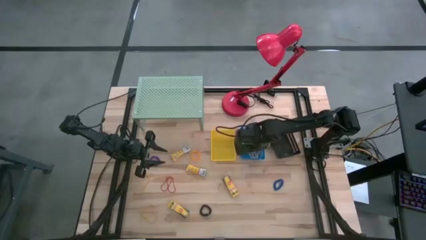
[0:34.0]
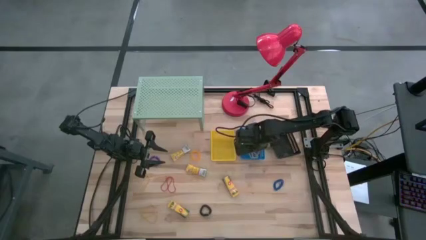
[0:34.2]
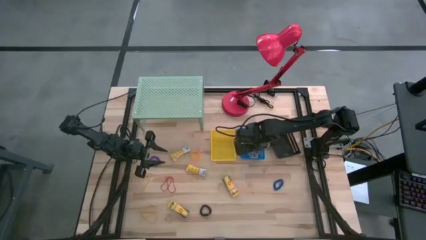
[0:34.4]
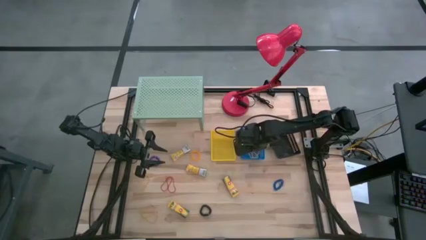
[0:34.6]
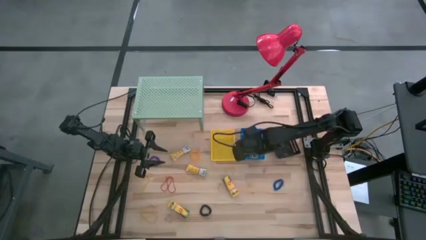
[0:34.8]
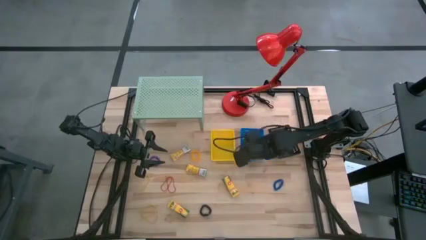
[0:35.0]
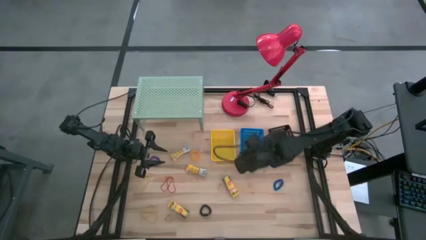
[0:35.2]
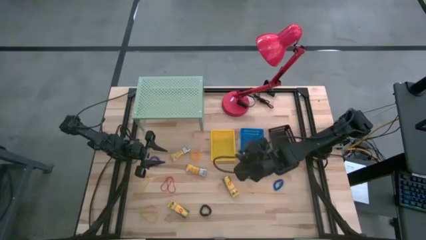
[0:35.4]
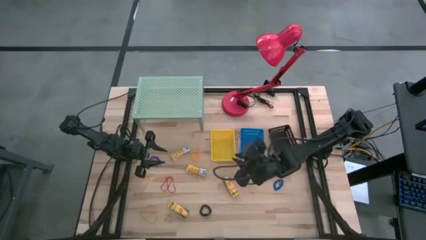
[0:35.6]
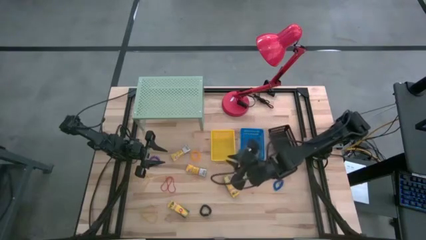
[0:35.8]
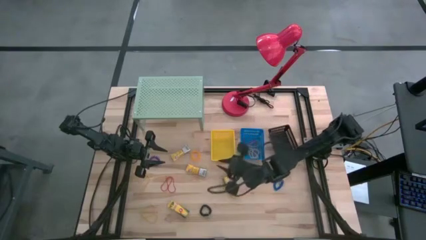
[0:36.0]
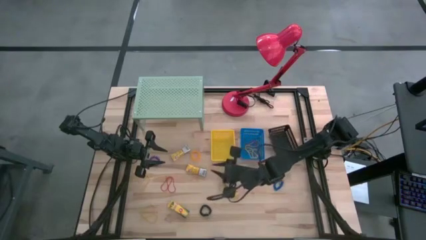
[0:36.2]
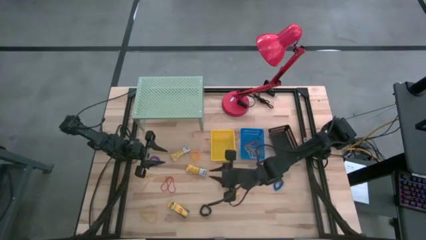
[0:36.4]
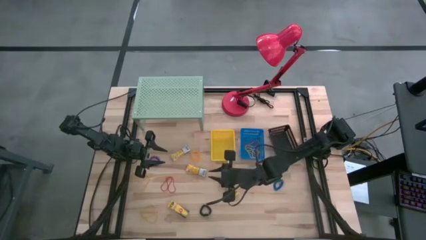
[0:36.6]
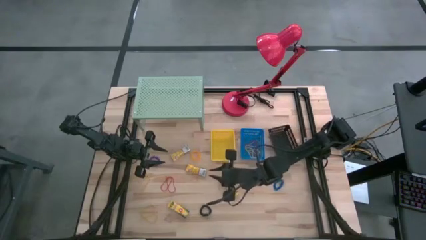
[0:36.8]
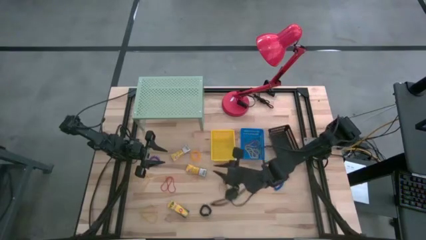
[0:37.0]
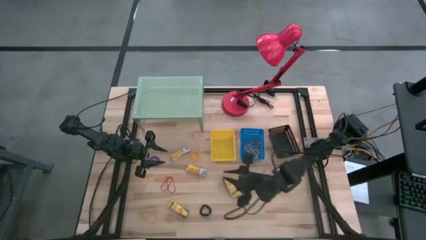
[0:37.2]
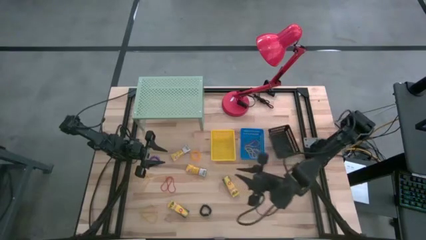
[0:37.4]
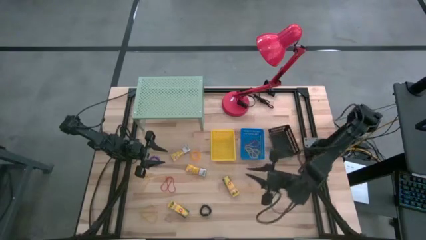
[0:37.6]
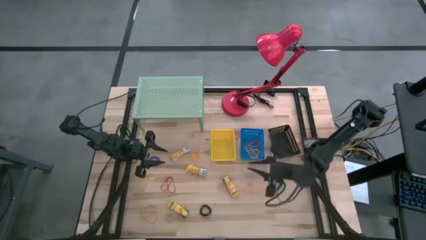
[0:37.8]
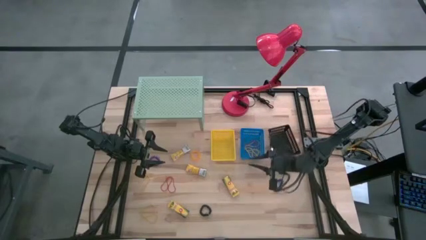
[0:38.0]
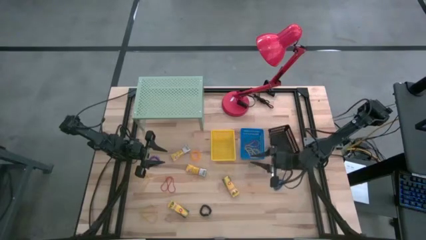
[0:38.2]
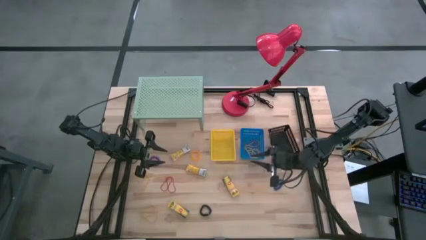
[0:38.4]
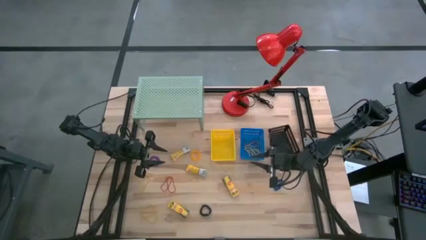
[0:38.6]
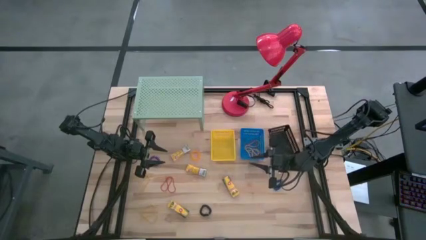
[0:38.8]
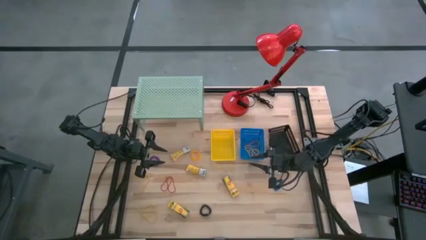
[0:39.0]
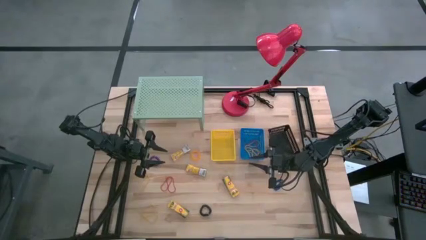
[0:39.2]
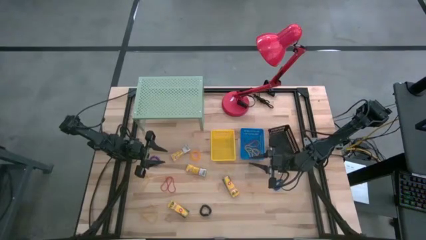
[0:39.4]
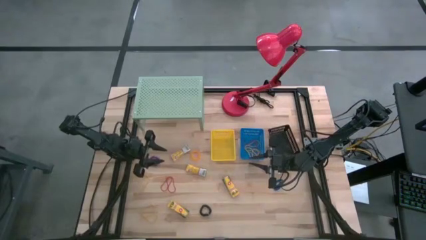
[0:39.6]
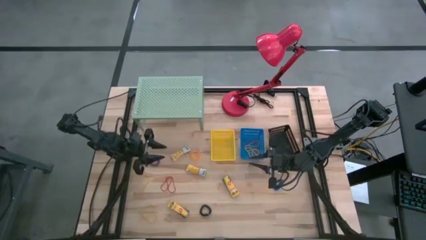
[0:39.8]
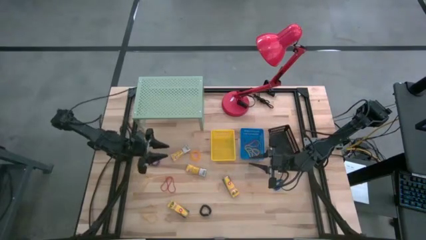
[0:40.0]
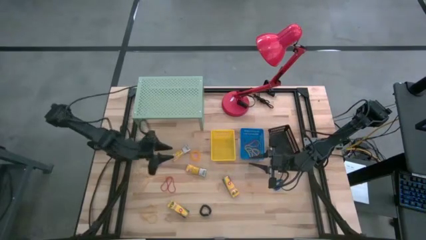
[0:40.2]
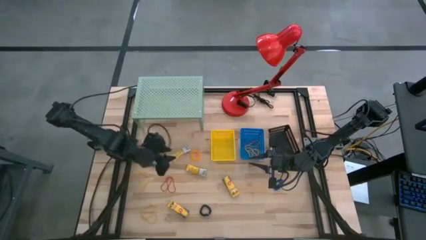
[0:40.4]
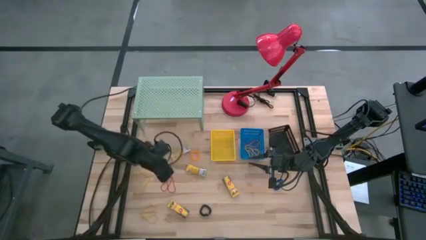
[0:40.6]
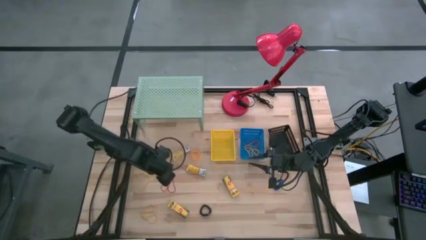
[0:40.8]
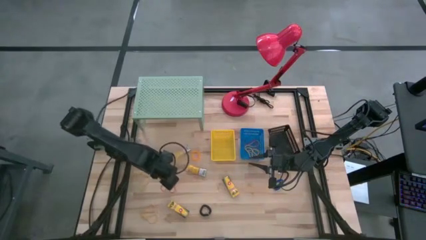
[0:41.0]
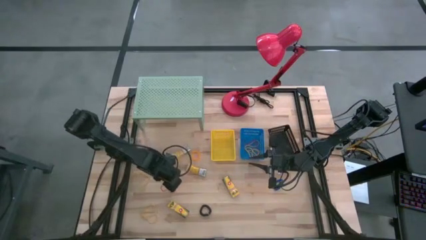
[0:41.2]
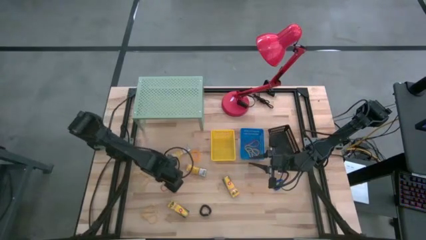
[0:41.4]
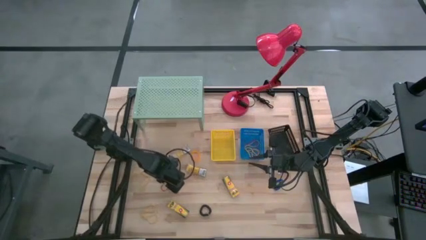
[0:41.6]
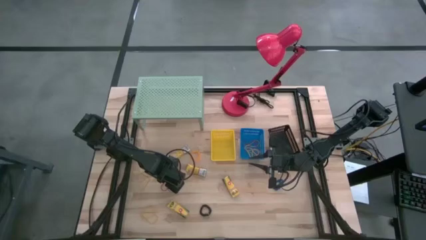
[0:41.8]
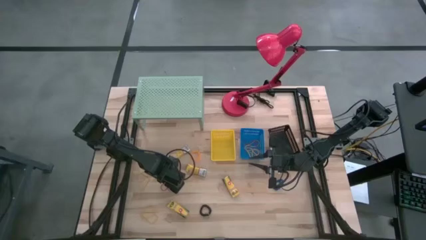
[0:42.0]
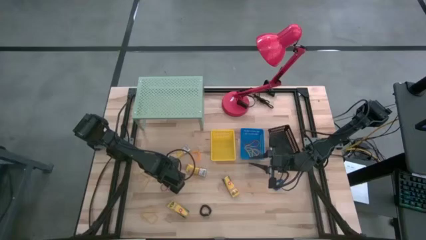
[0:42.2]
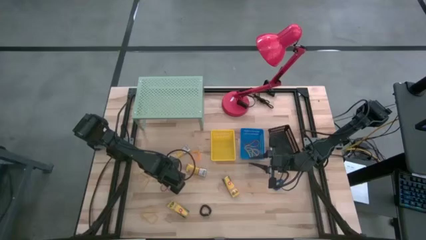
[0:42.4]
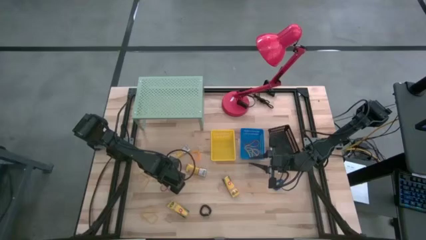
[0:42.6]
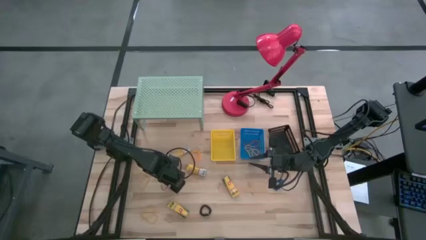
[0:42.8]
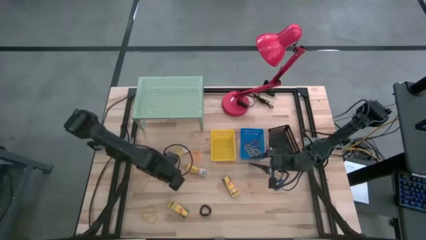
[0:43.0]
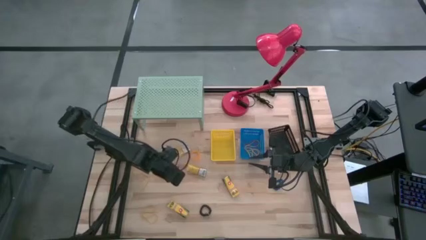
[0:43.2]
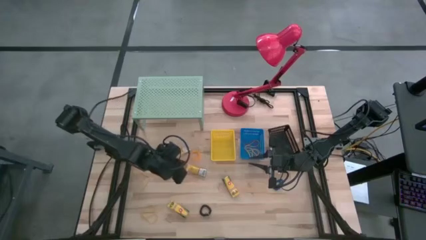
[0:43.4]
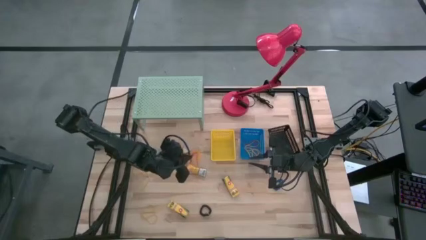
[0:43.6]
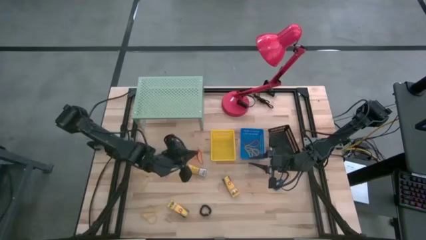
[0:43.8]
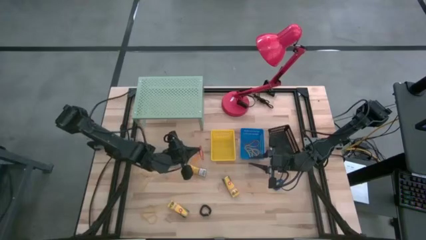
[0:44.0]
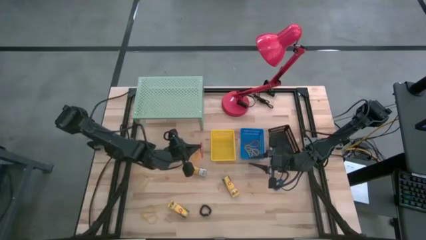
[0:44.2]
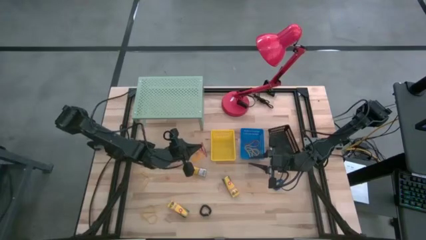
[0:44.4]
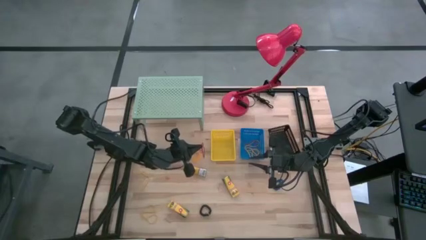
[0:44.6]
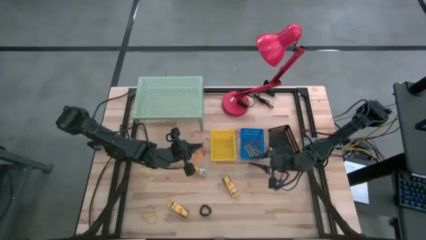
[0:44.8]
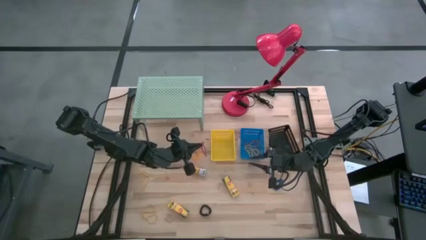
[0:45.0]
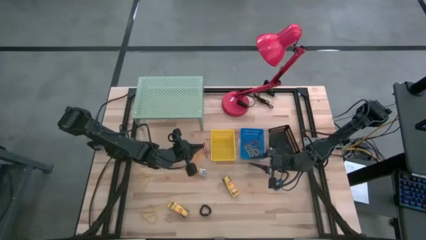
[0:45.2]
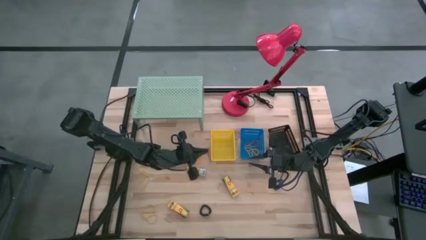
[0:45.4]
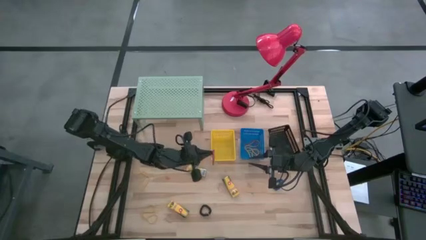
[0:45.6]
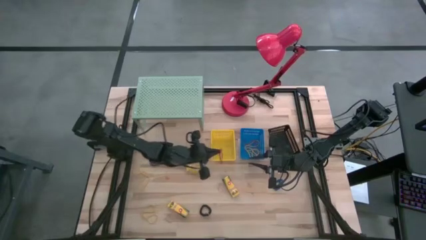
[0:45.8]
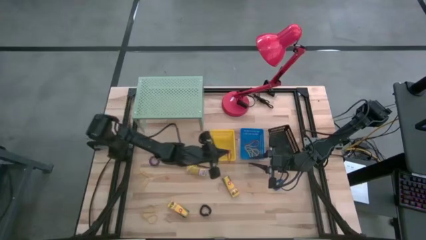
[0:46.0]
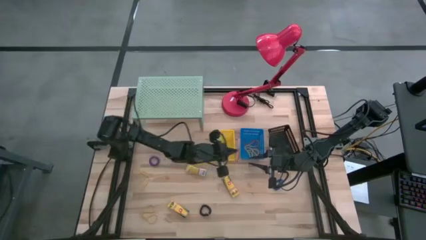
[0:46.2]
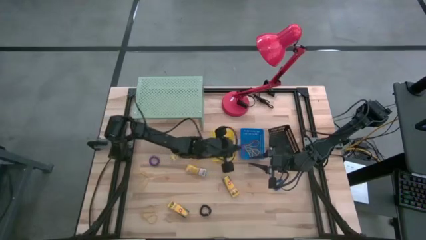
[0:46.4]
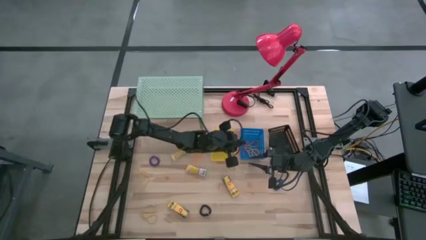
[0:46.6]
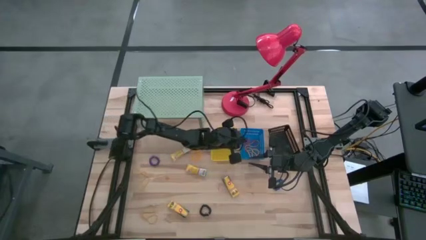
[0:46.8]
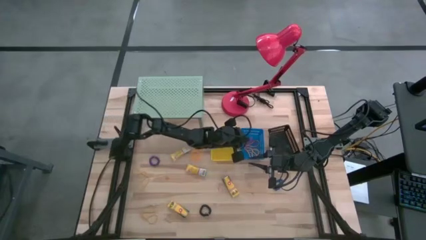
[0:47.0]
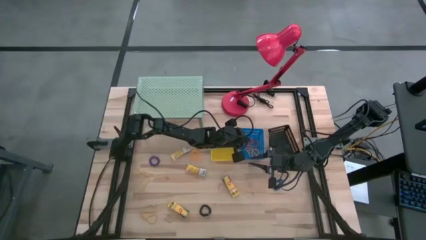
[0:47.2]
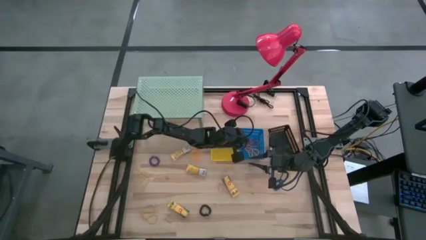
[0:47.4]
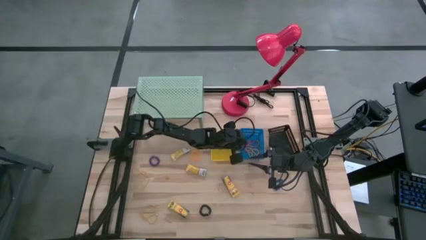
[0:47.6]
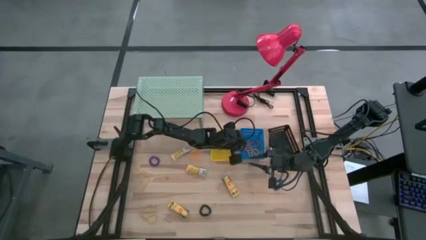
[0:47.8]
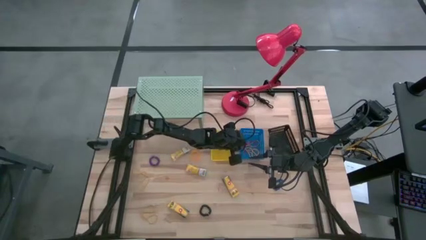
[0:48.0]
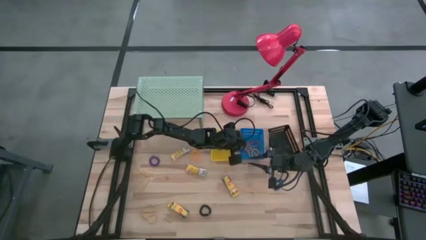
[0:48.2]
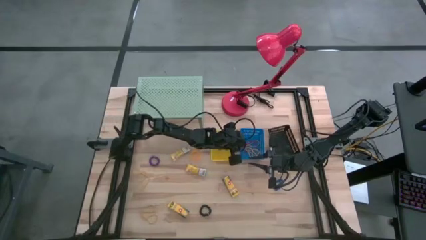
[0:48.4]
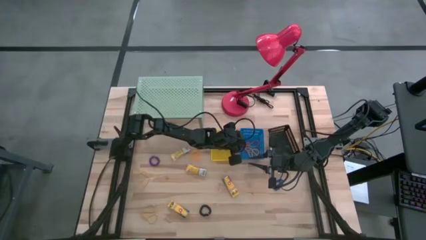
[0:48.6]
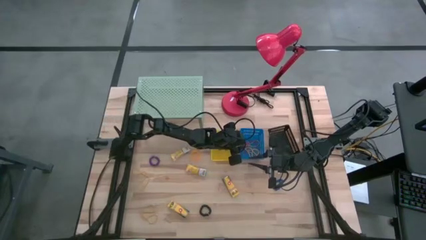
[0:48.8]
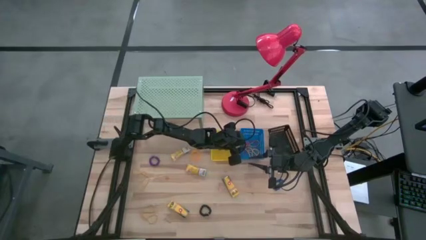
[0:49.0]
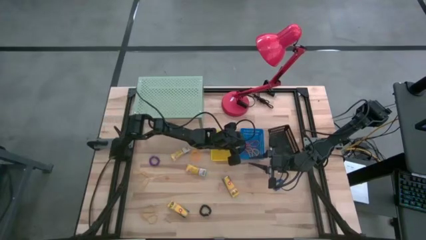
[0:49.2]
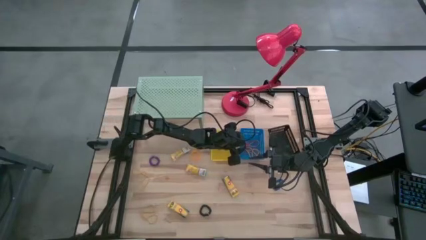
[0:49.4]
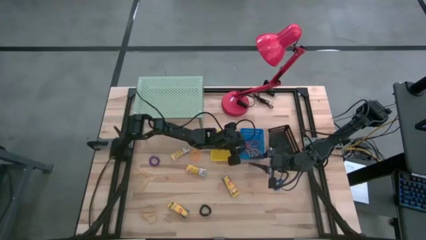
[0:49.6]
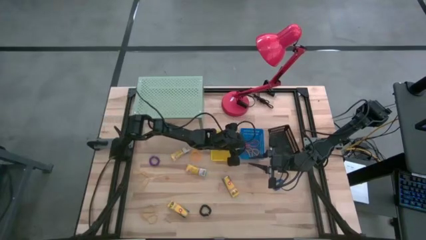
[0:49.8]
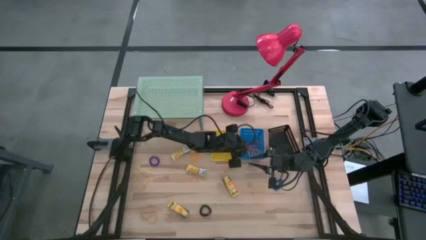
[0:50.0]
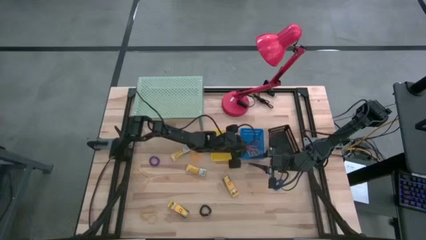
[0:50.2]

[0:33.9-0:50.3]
Task: Pick & Place Office Desk Supplies
Put the red rubber band into the blue basket
